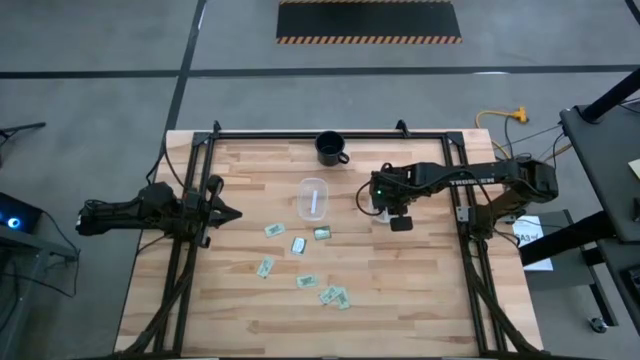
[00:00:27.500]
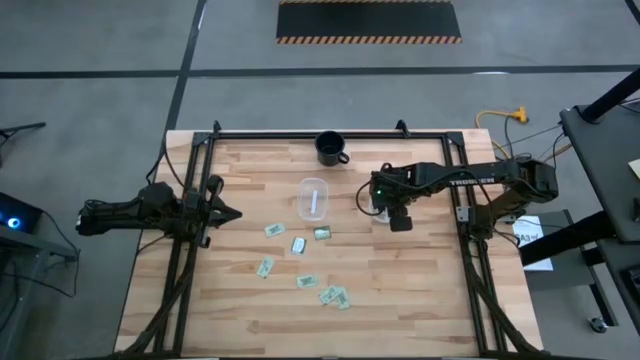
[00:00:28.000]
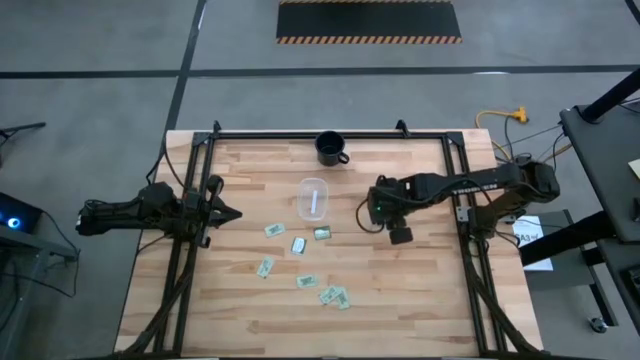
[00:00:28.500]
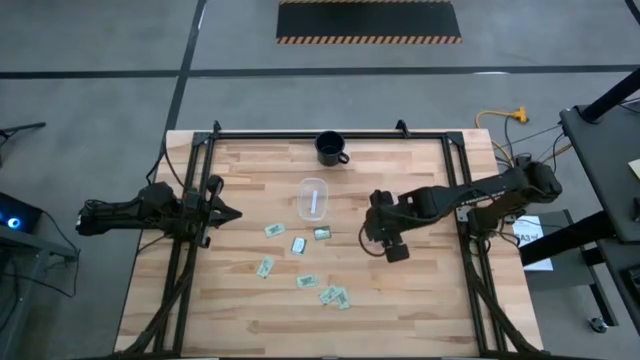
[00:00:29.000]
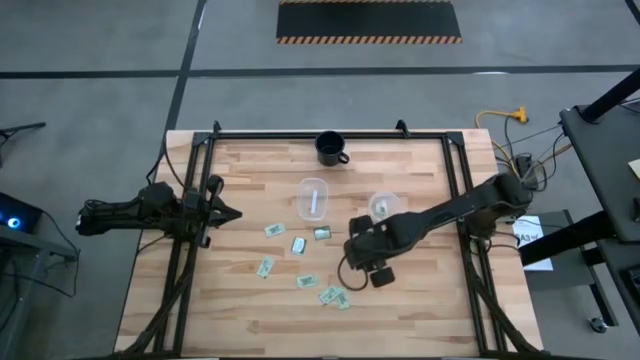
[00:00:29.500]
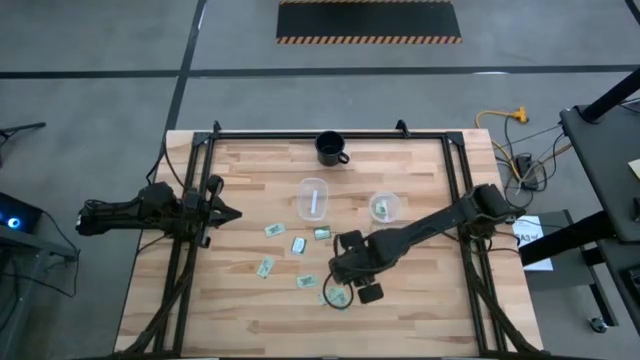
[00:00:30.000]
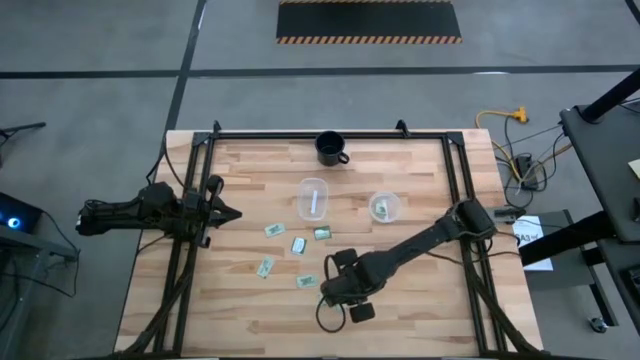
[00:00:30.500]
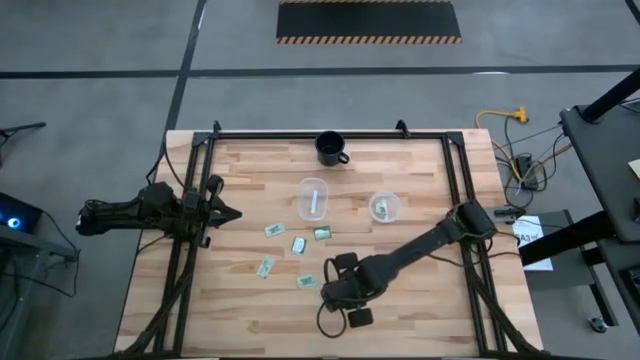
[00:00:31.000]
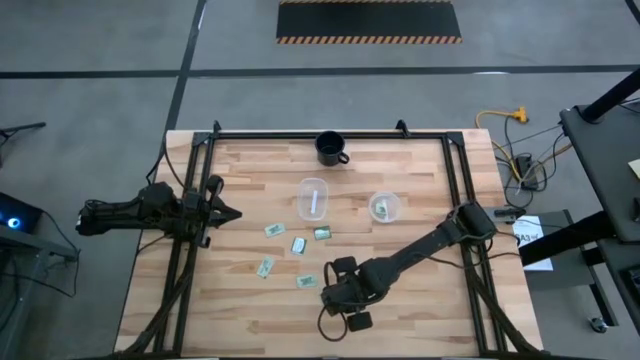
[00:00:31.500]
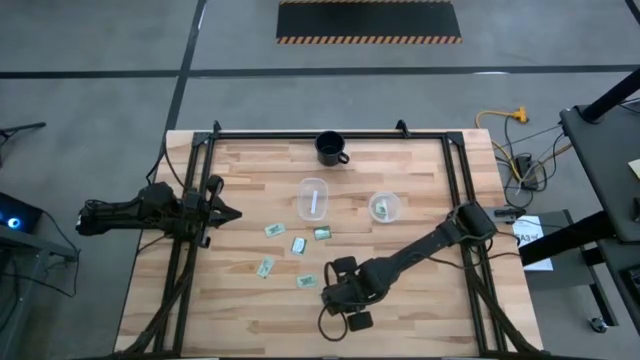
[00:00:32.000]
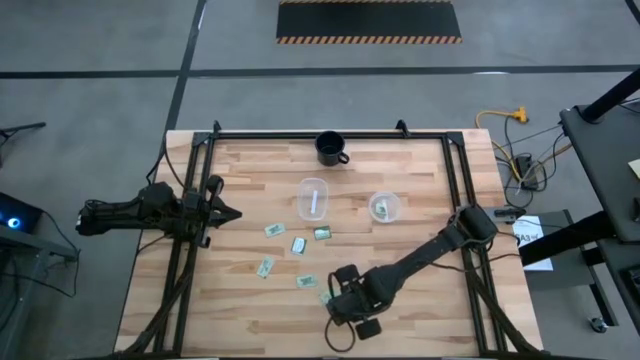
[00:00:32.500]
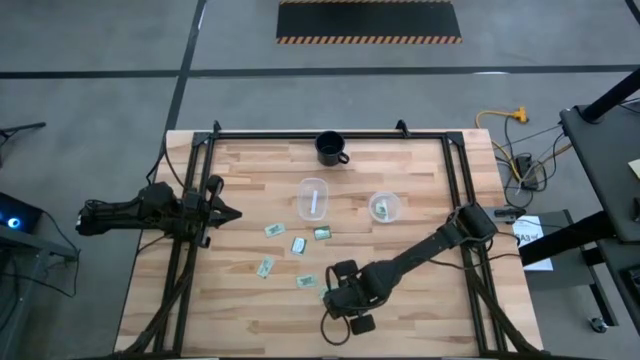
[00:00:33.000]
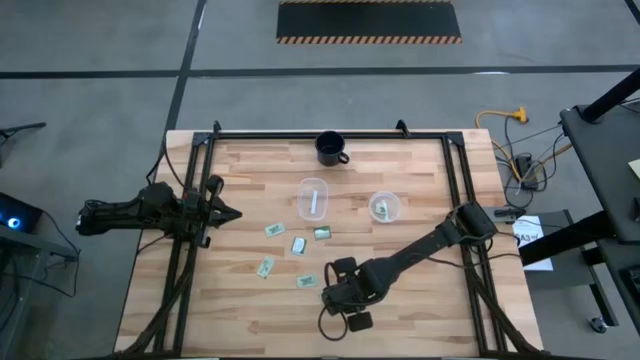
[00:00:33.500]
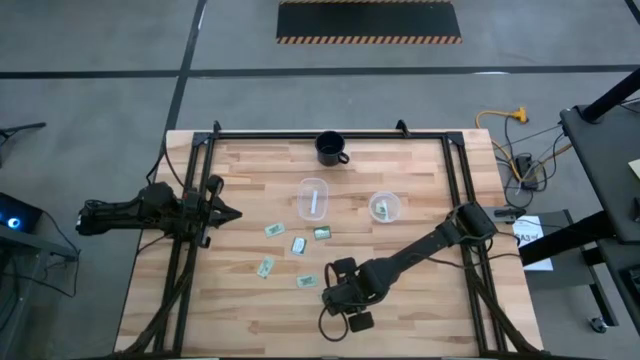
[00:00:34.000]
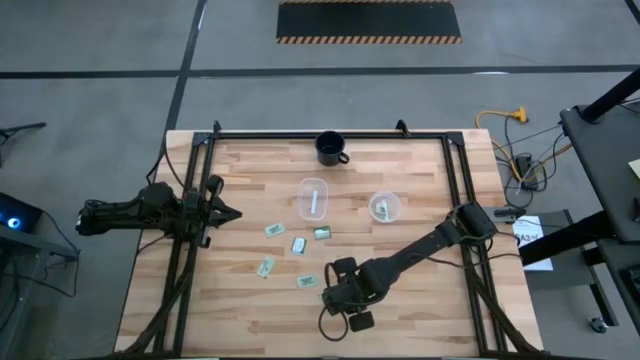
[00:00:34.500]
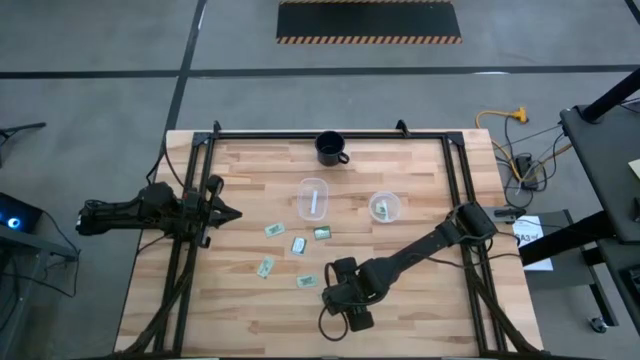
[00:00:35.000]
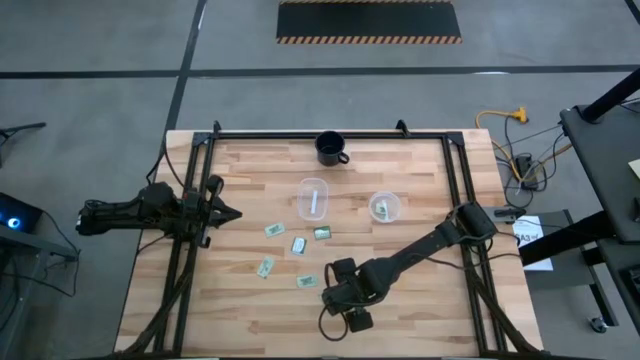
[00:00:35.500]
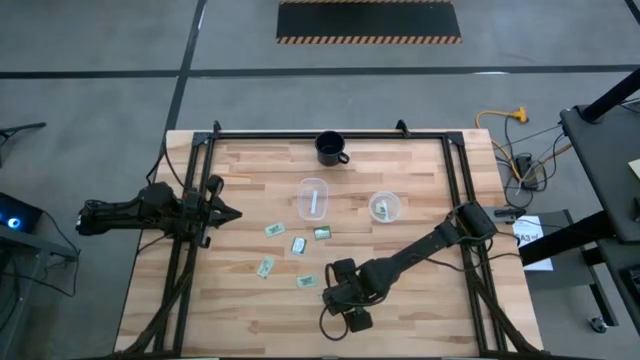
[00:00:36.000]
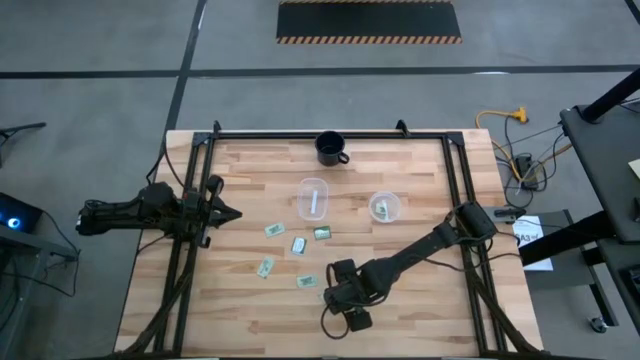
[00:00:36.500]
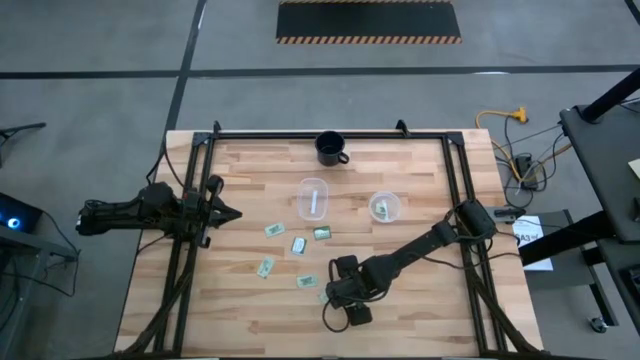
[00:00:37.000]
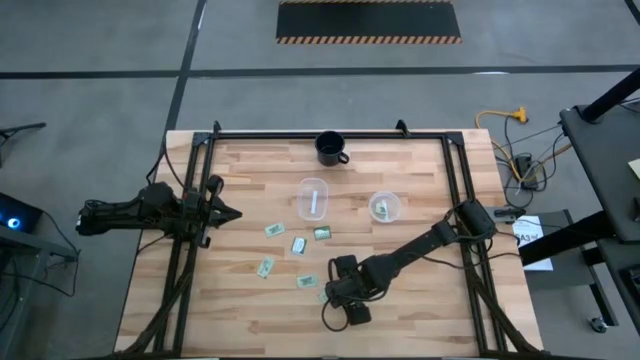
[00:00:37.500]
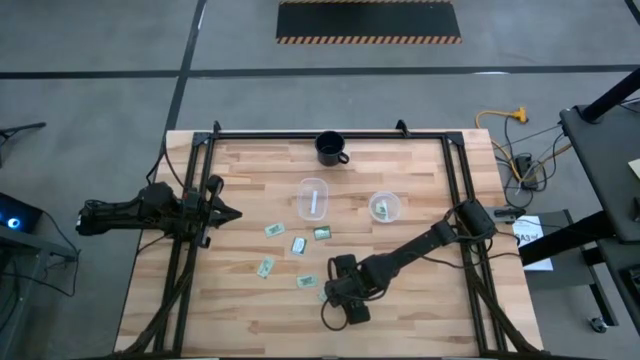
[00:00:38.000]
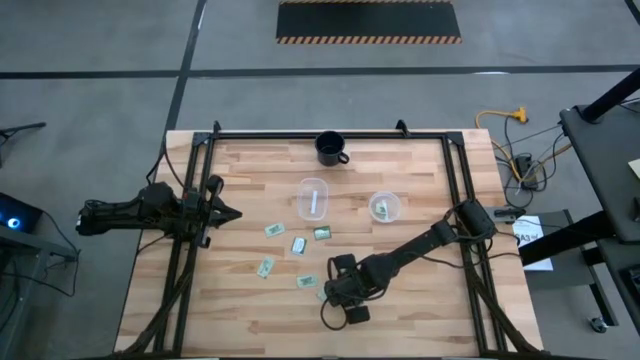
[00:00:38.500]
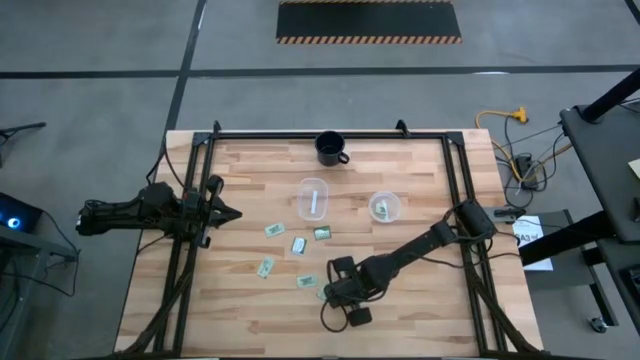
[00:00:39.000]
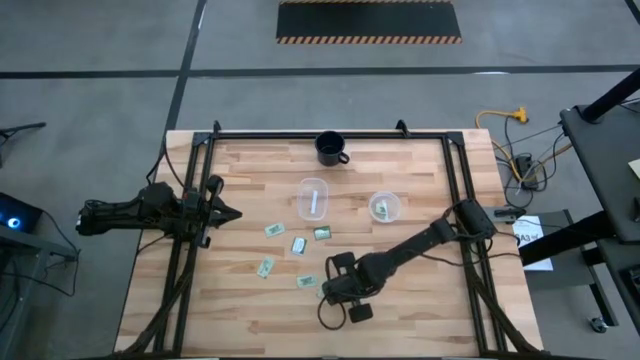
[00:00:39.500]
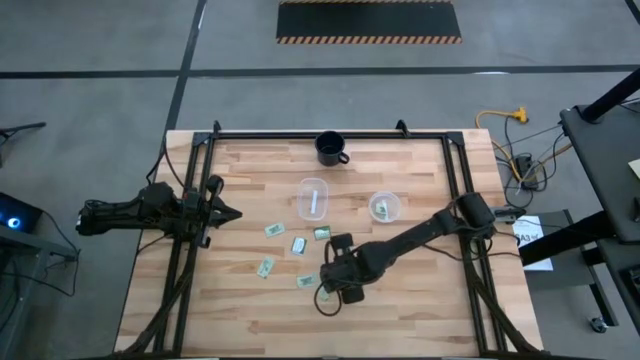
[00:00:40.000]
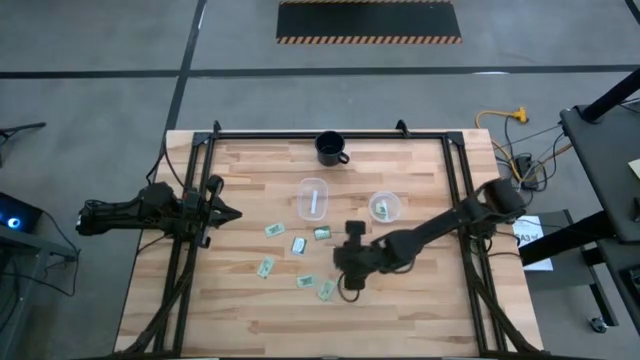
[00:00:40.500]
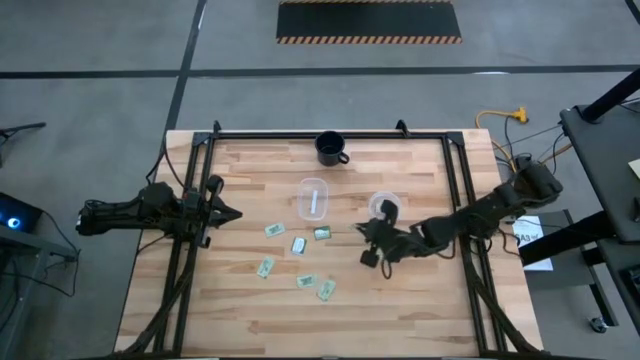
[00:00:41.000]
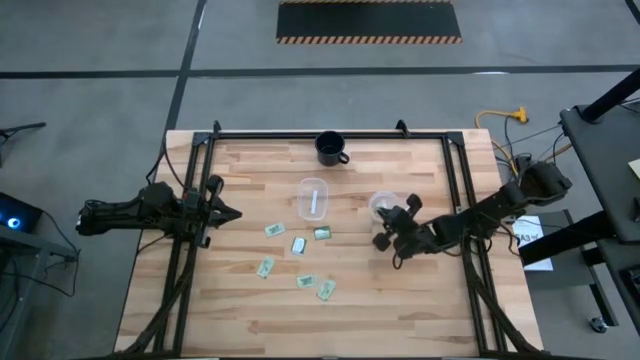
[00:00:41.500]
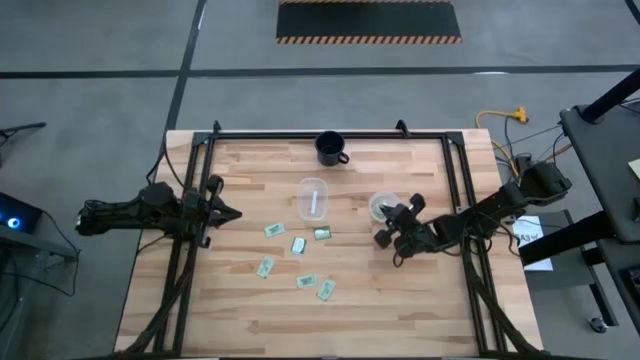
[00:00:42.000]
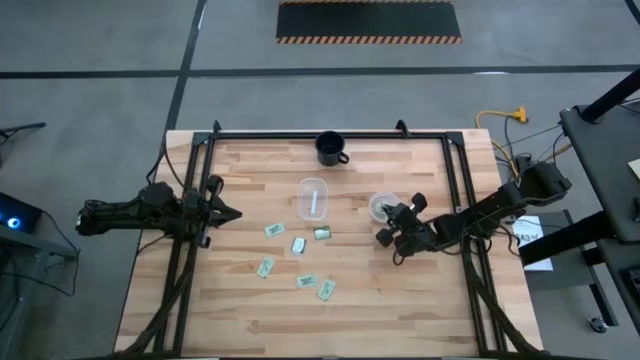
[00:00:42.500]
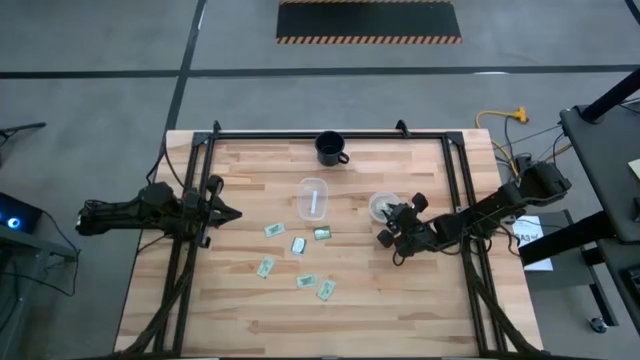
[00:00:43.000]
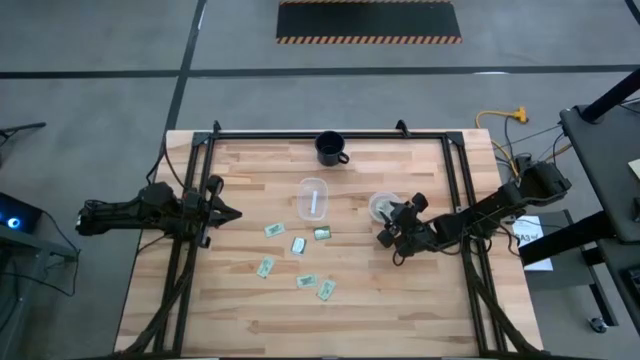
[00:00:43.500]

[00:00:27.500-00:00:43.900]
Task: Pick and place items into bin
Put the white stevia packet into the right transparent bin
